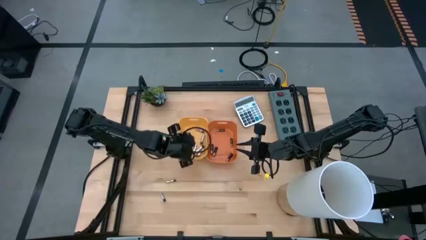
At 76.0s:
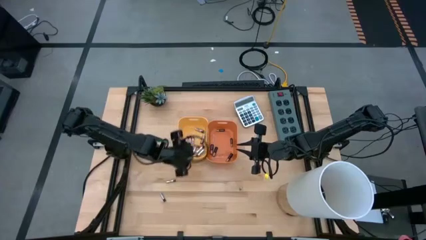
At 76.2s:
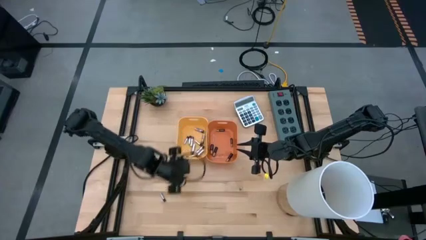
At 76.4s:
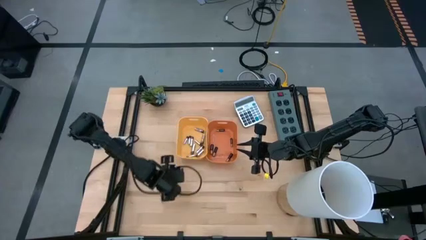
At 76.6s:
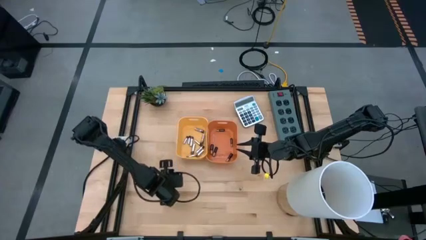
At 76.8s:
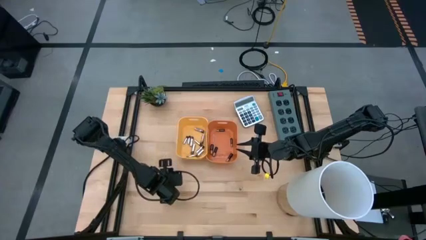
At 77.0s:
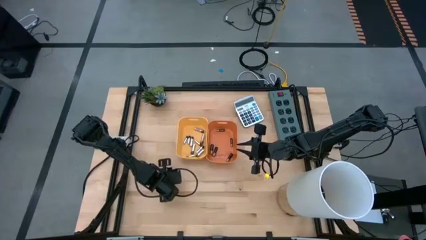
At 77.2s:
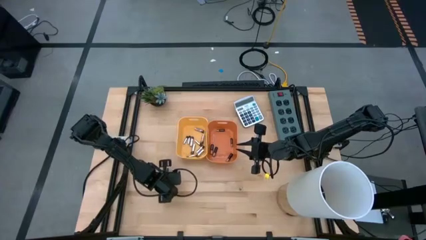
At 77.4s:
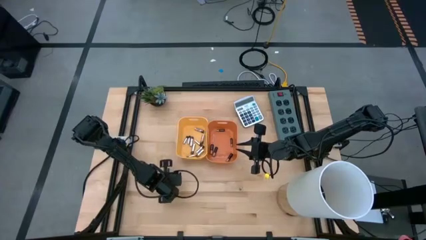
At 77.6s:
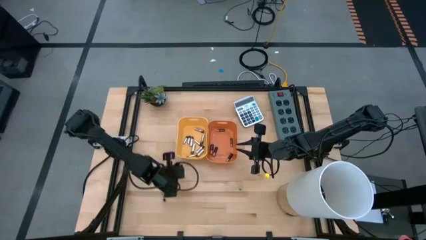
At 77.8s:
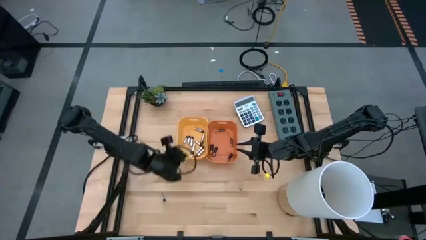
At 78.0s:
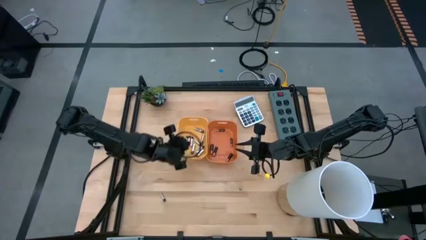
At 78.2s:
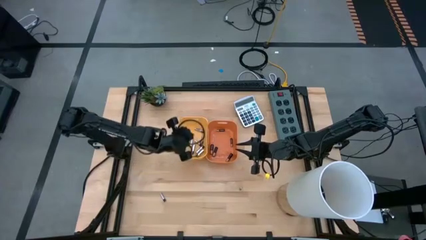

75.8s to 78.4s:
Task: Sort batteries
Put the silver battery into the yellow bin

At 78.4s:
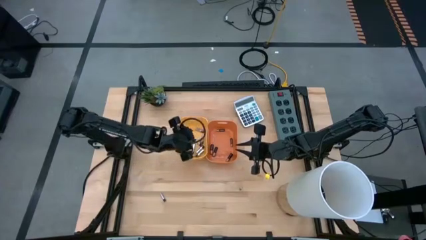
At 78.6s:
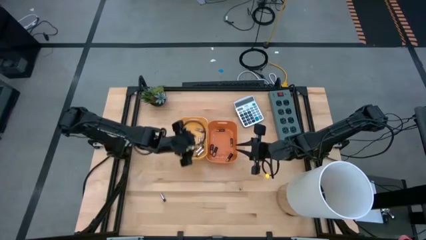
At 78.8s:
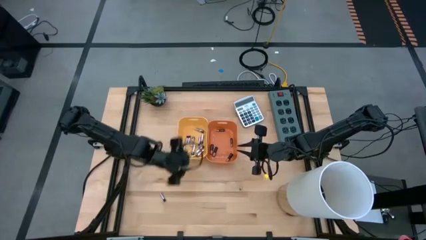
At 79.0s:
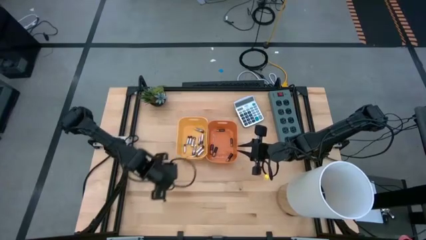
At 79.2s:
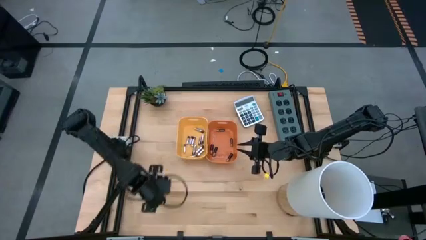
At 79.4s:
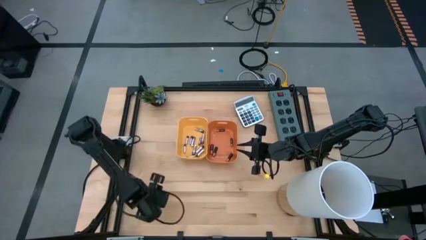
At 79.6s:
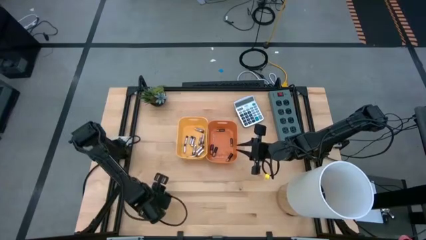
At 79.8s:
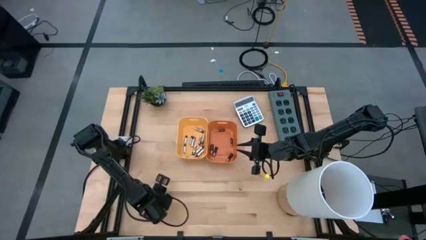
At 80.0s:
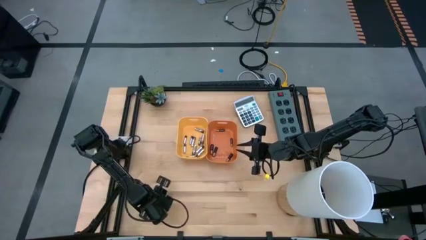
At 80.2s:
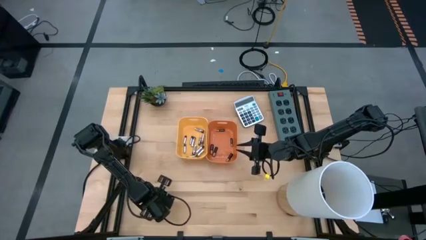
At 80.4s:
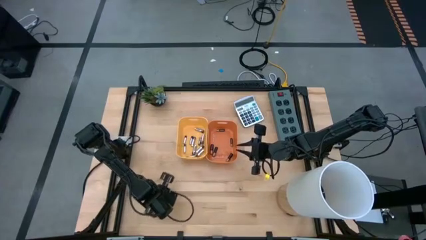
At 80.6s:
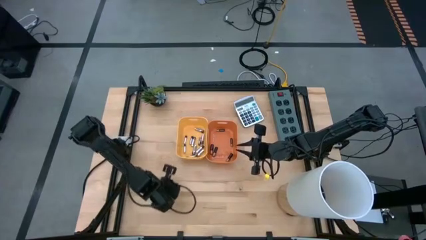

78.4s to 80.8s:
Put the silver battery into the yellow bin

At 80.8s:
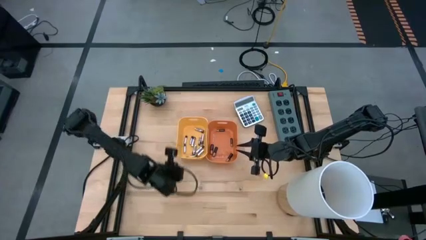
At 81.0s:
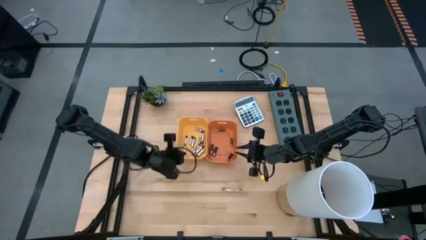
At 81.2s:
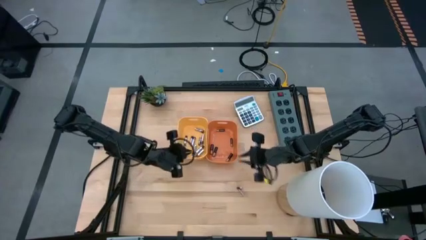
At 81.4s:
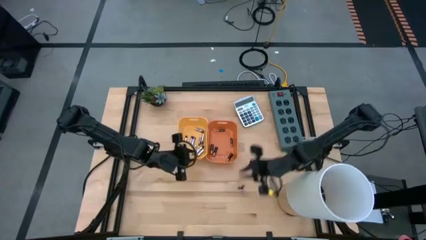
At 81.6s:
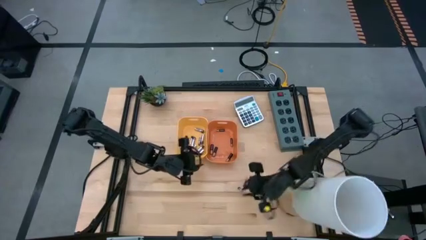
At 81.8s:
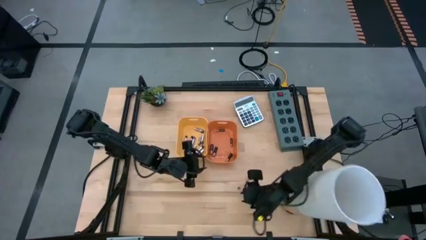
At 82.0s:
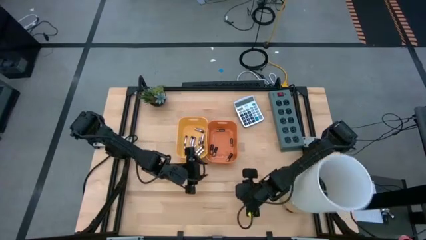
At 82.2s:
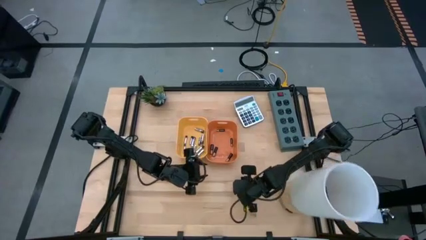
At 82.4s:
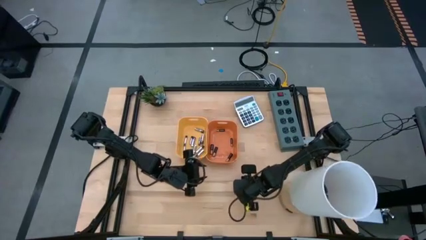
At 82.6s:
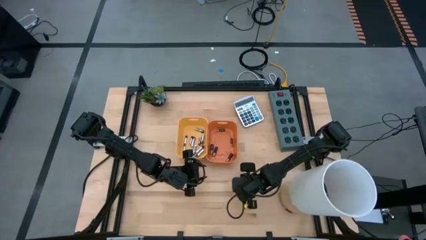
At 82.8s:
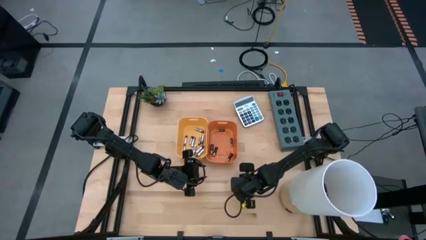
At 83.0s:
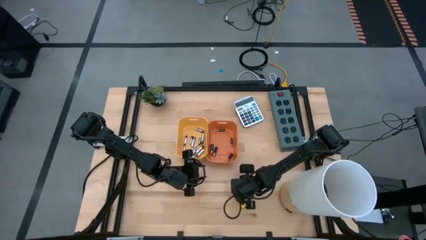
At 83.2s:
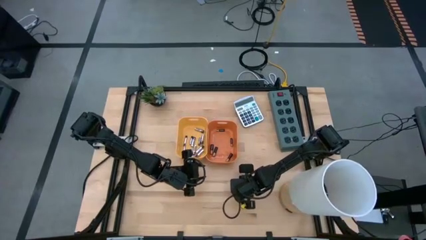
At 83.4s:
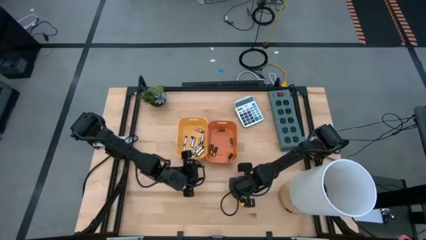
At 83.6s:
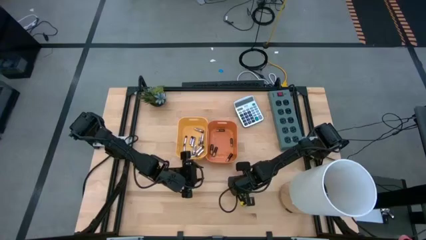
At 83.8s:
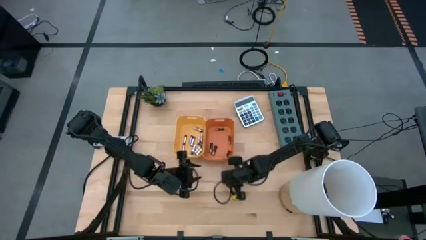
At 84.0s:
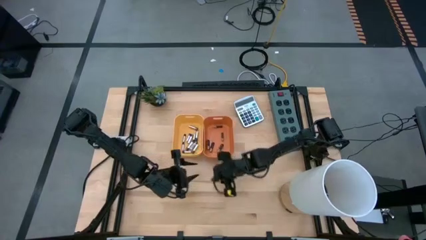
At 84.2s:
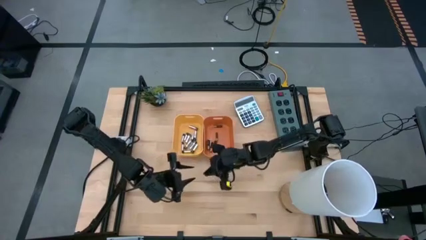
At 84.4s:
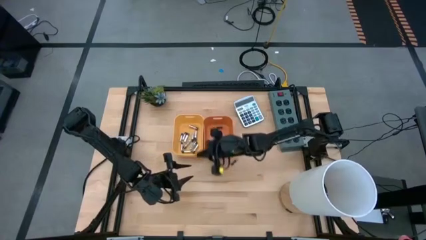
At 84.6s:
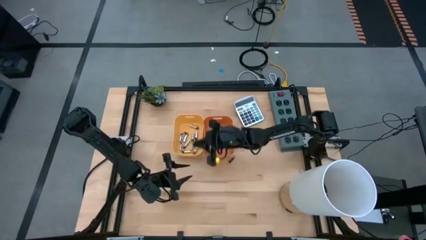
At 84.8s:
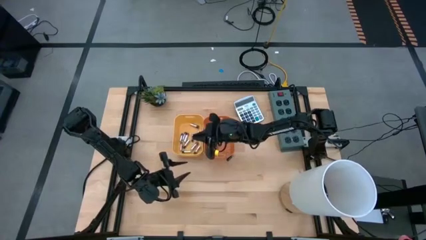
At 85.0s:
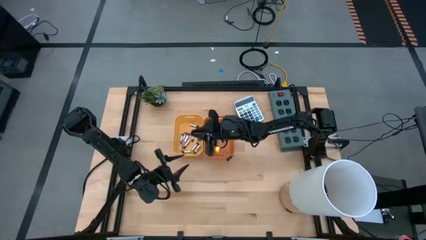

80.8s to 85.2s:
Put the silver battery into the yellow bin

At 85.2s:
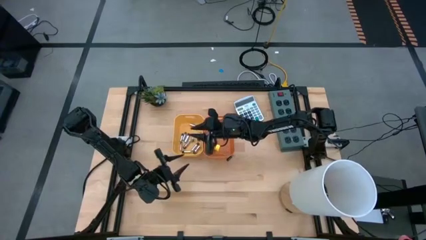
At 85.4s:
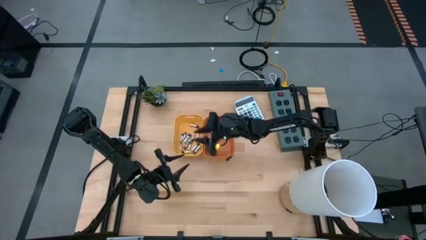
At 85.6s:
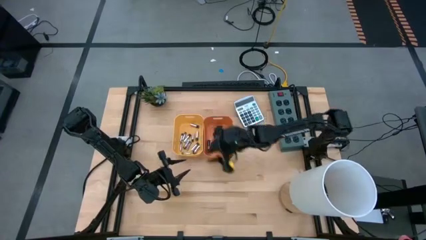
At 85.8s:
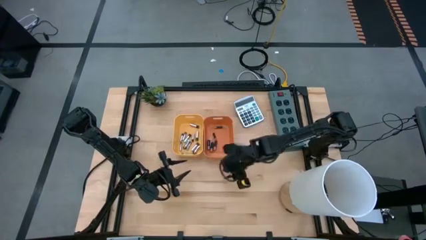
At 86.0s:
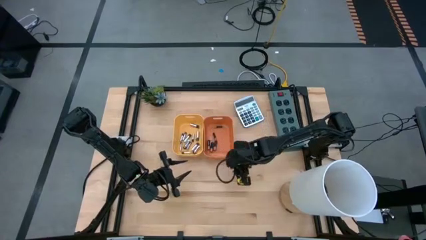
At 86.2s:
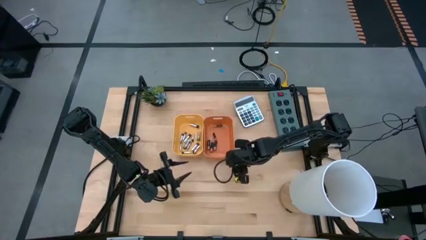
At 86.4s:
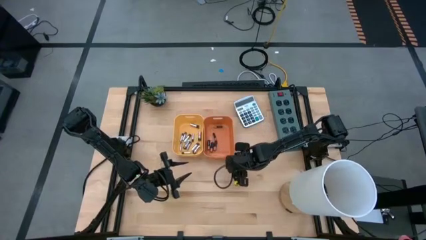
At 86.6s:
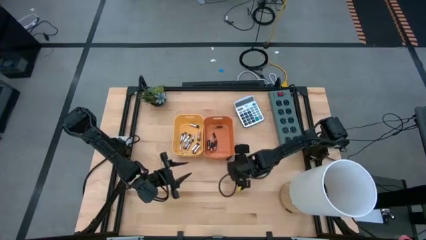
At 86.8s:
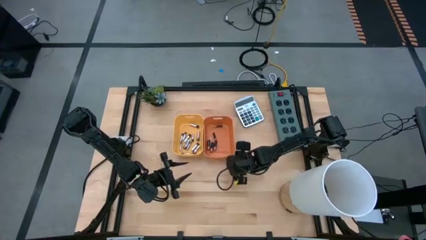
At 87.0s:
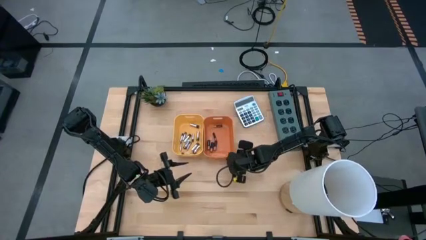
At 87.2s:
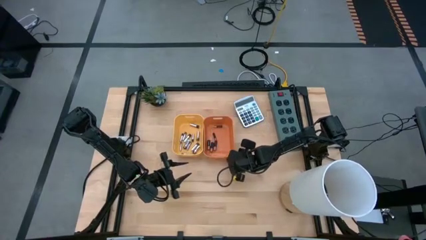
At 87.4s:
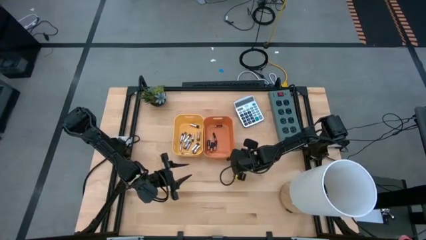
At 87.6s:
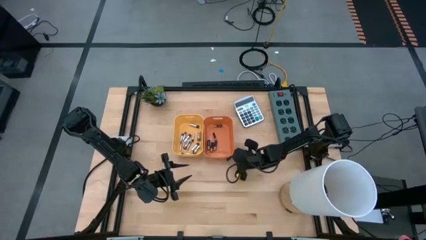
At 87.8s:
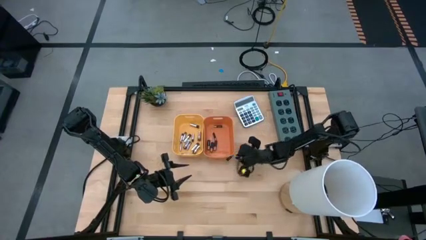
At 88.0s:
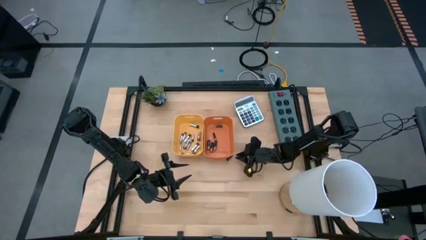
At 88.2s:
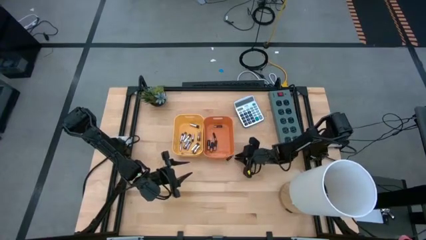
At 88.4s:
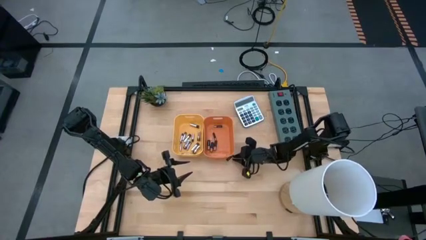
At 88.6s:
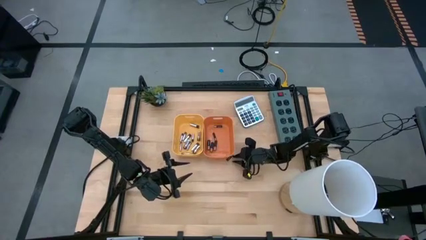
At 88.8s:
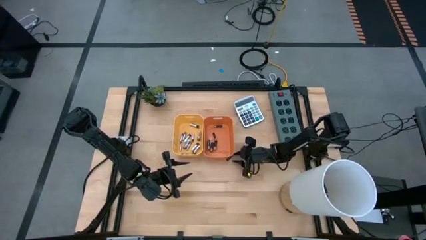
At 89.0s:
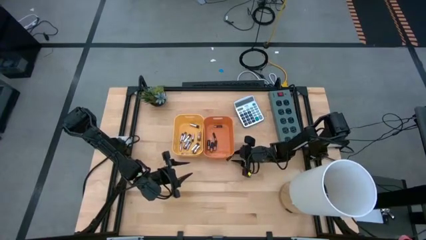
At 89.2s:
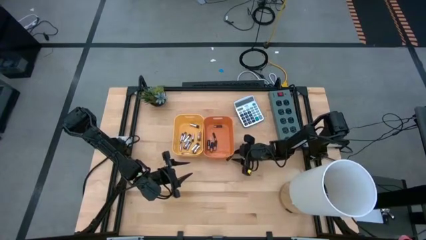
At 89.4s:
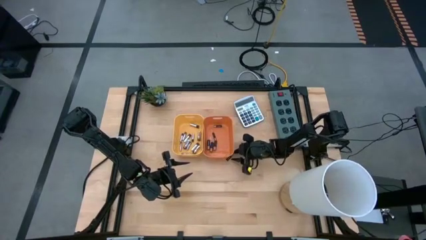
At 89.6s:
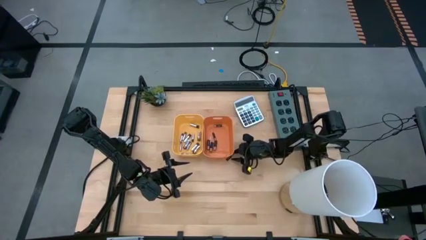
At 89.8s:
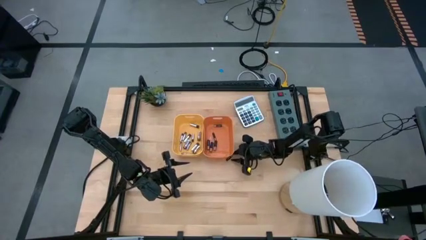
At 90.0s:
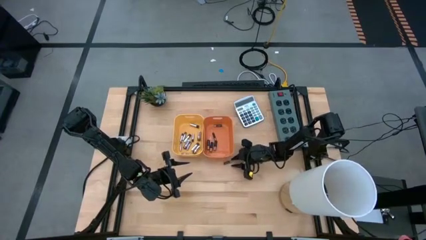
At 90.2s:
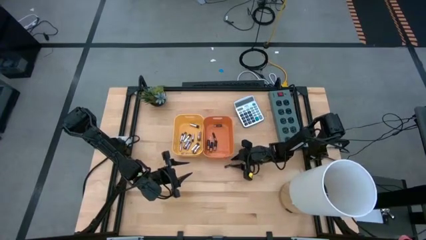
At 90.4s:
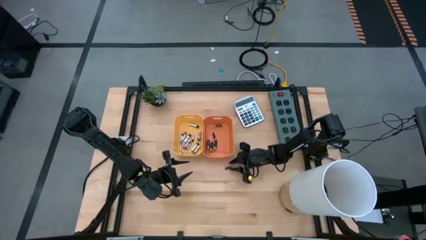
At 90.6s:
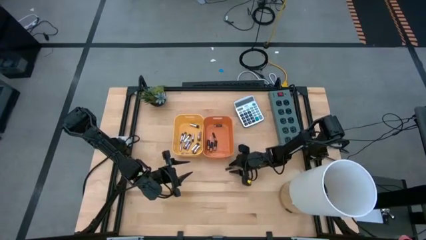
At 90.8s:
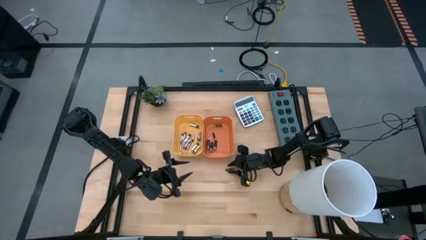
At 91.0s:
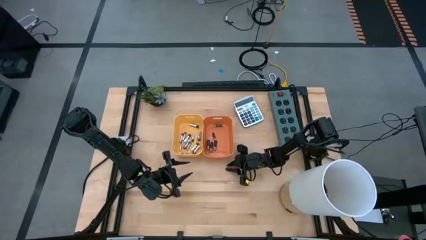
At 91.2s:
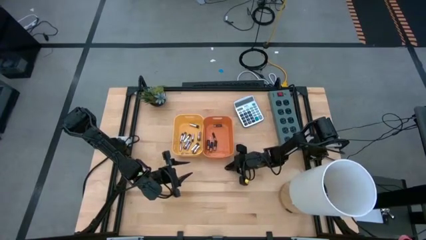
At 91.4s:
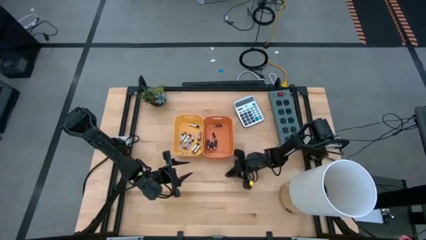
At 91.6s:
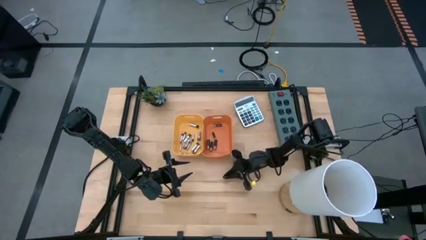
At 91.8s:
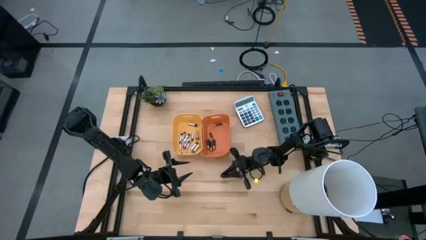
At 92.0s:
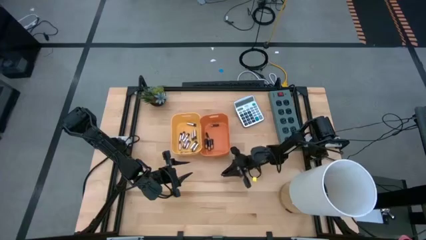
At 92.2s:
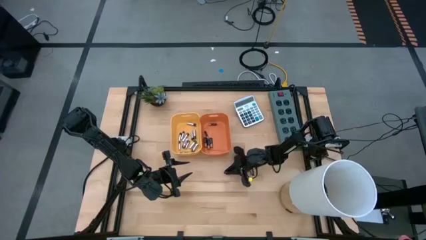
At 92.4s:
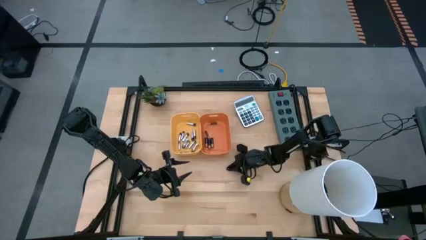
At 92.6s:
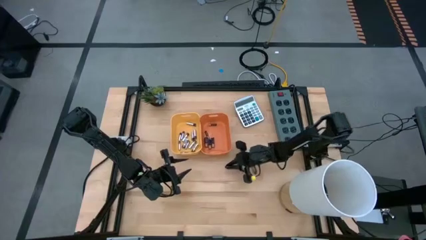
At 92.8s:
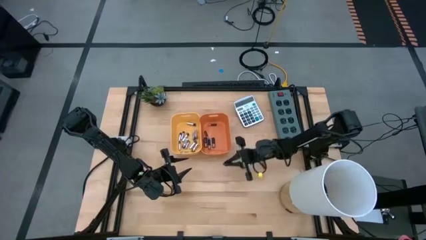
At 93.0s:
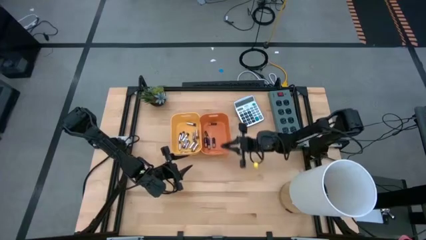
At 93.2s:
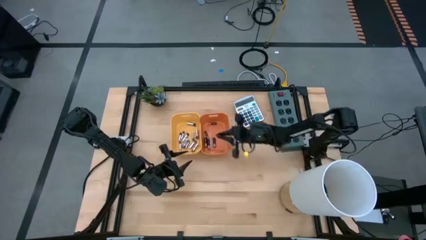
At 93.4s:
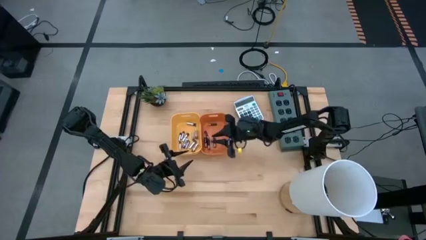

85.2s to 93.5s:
Put the black battery into the orange bin
